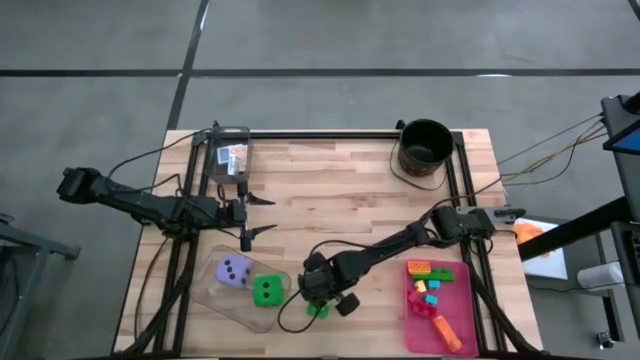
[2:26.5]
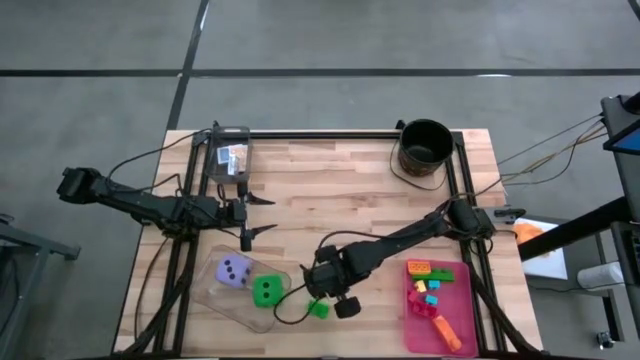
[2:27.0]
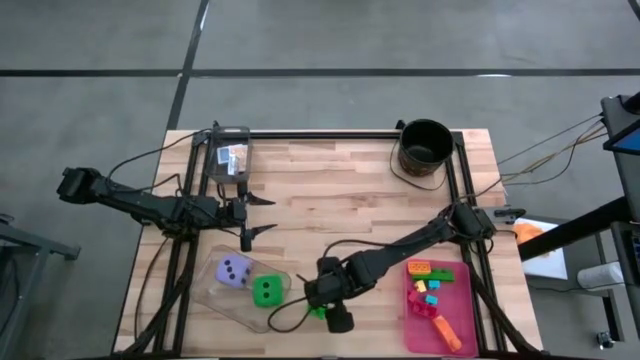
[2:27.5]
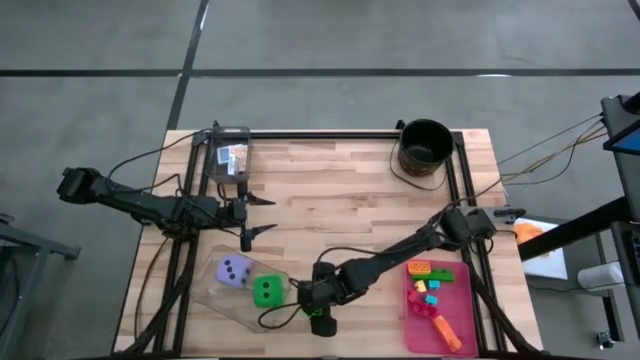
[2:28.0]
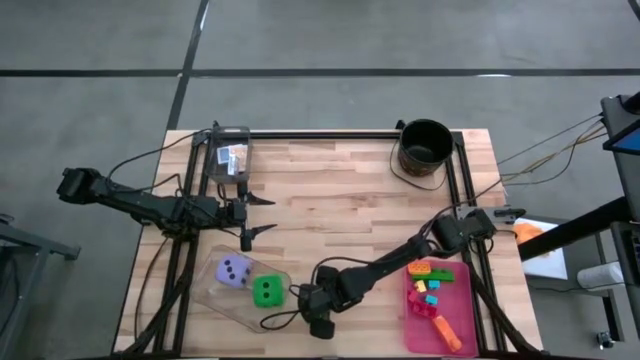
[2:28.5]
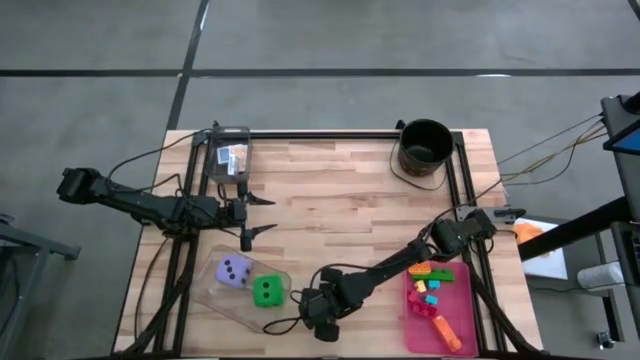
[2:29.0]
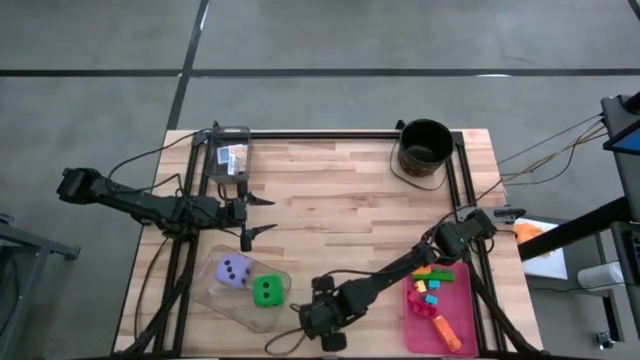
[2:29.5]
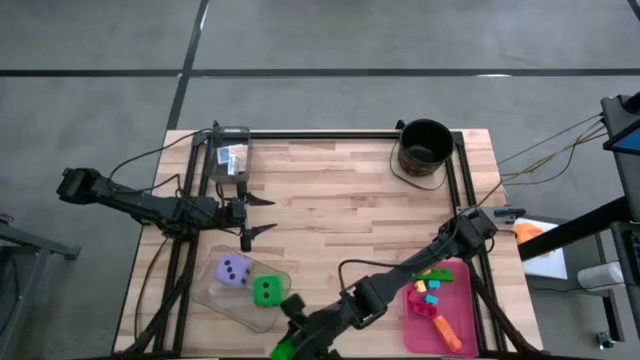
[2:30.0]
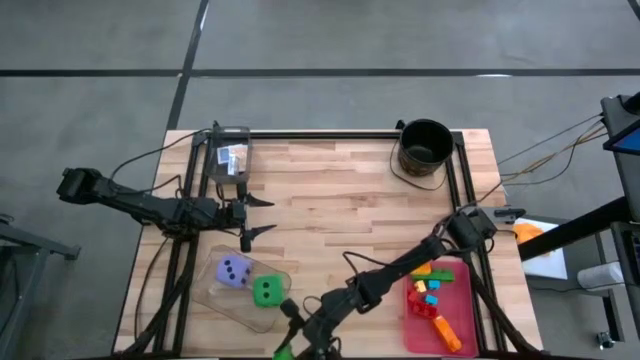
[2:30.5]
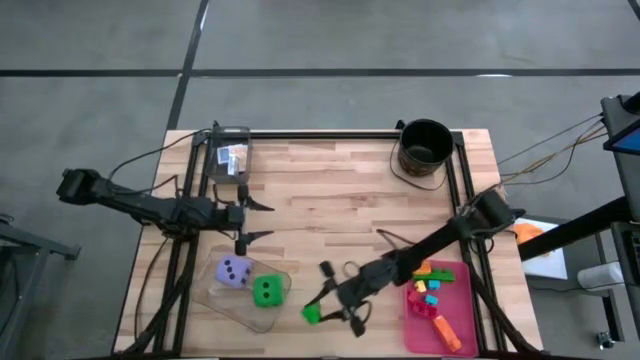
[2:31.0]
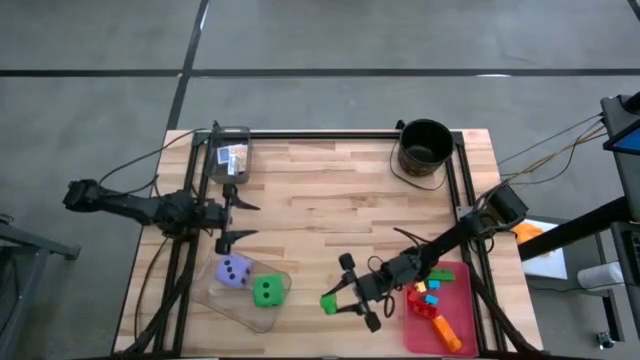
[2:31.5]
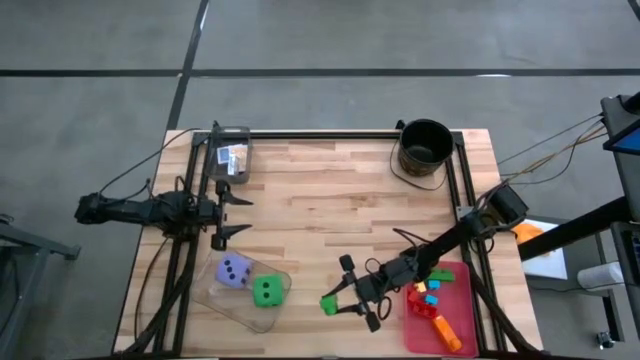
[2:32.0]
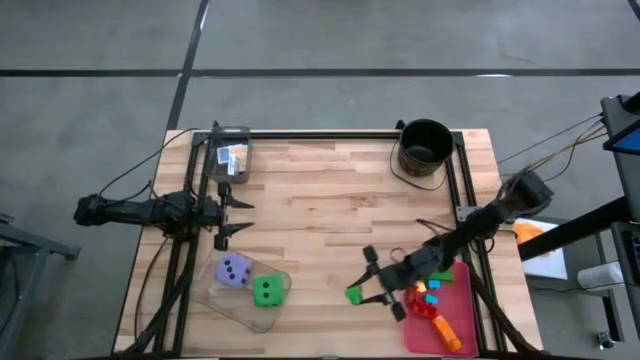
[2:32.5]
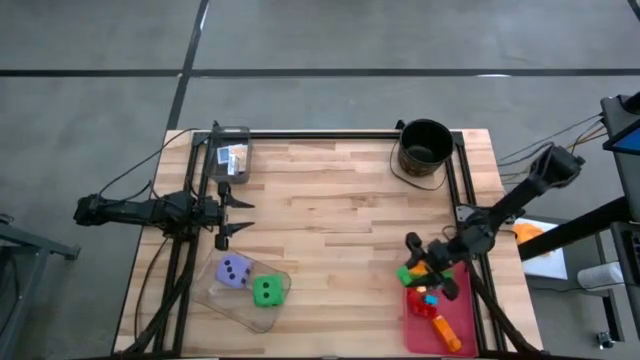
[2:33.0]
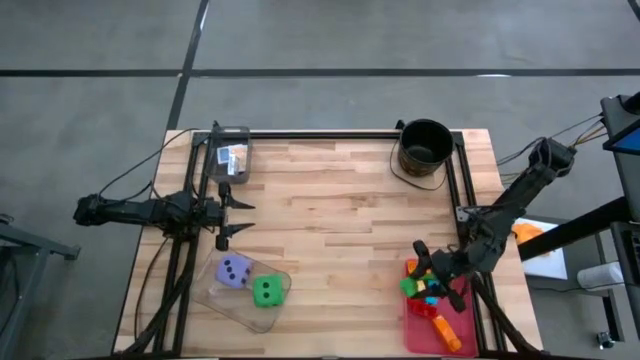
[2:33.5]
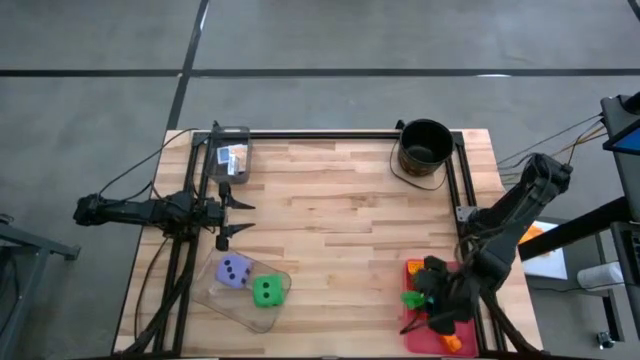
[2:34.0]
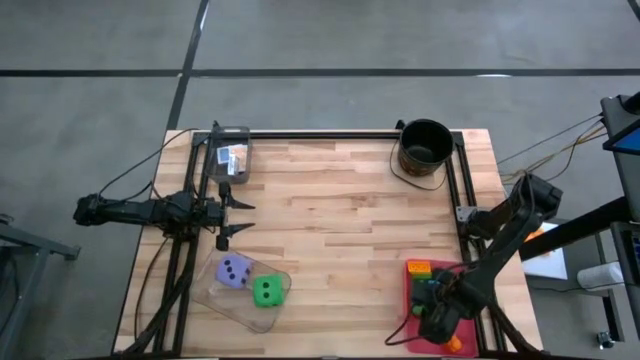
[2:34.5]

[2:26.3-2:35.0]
Task: Pick & Place Toys
Put the green game piece into the pink bin

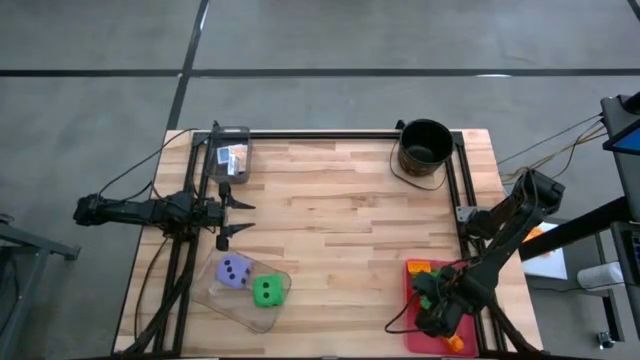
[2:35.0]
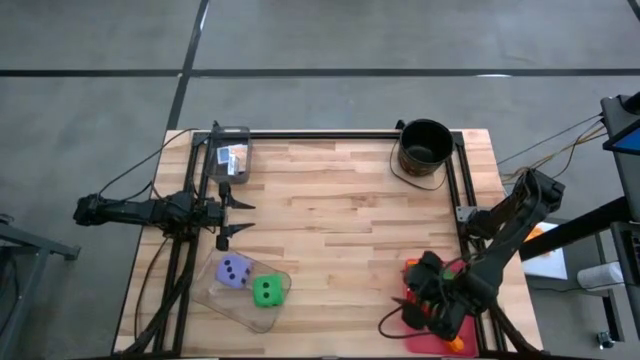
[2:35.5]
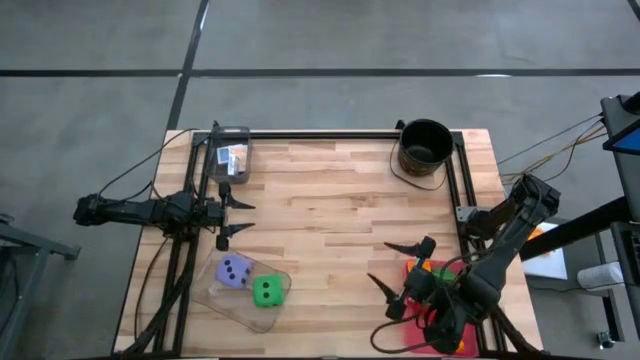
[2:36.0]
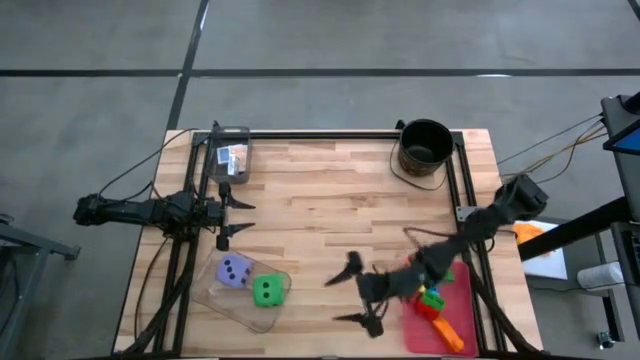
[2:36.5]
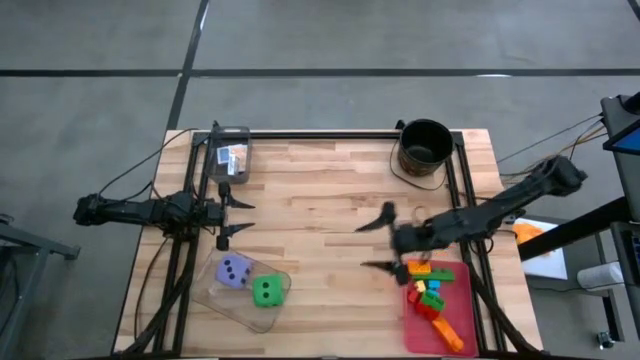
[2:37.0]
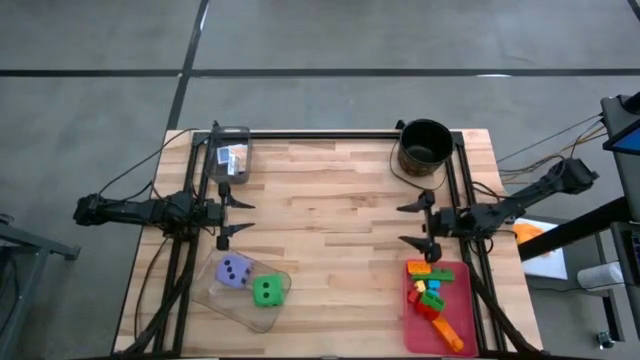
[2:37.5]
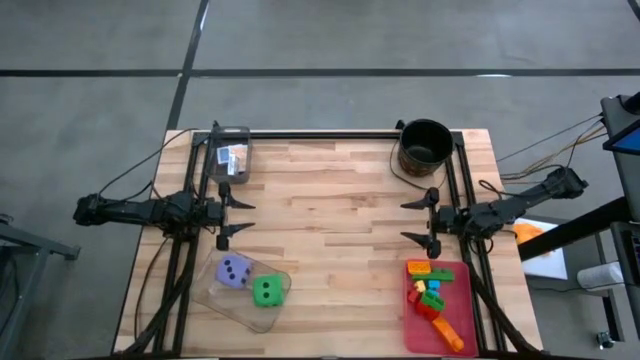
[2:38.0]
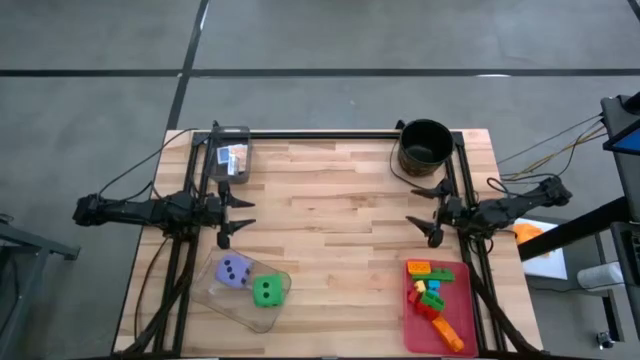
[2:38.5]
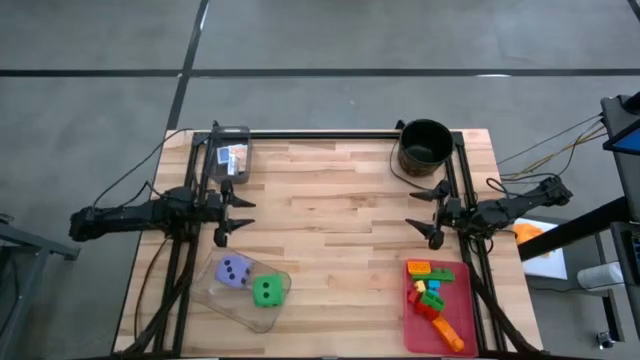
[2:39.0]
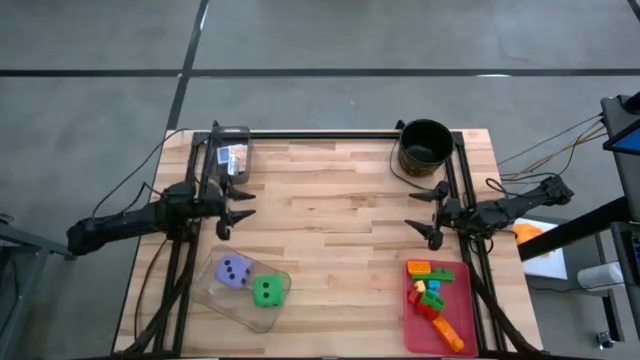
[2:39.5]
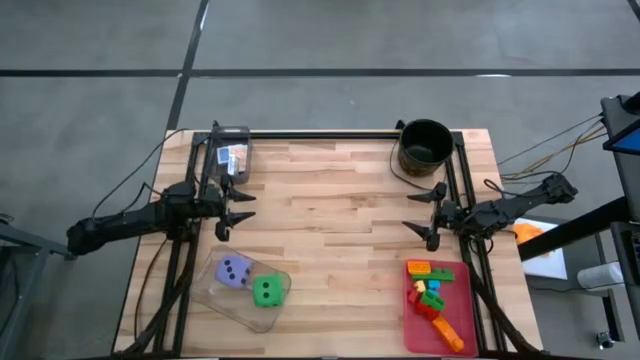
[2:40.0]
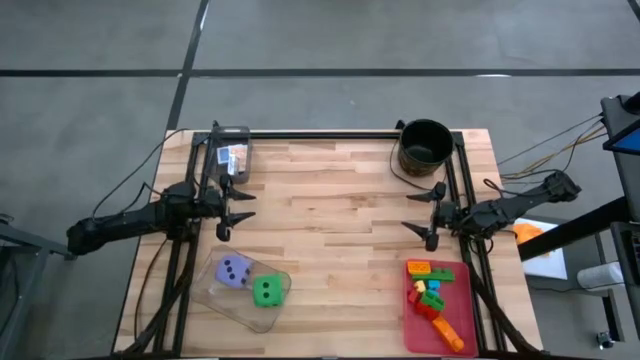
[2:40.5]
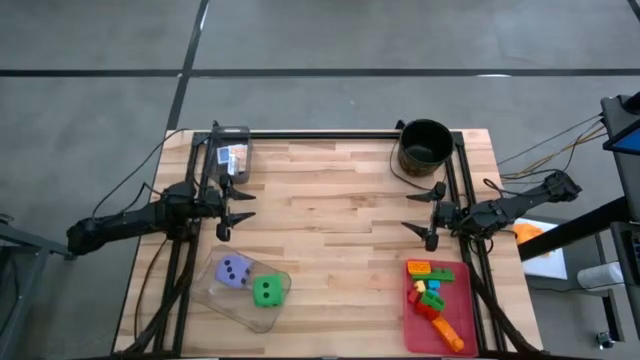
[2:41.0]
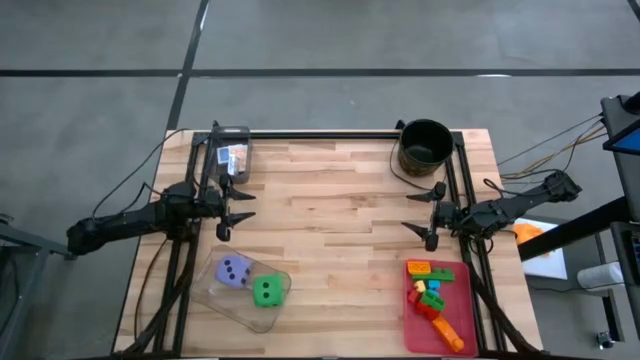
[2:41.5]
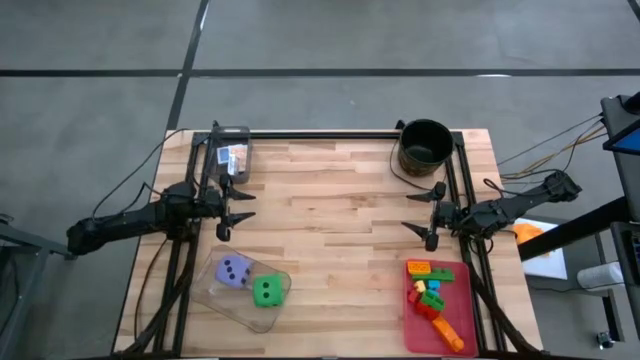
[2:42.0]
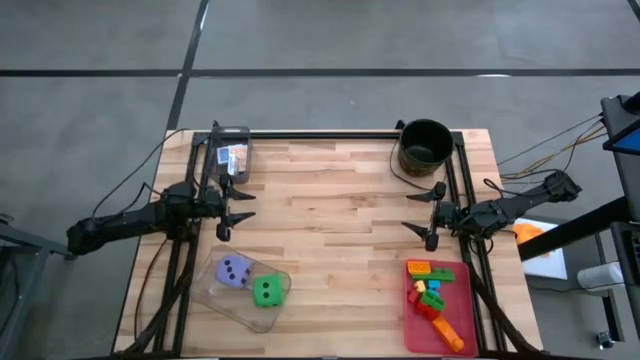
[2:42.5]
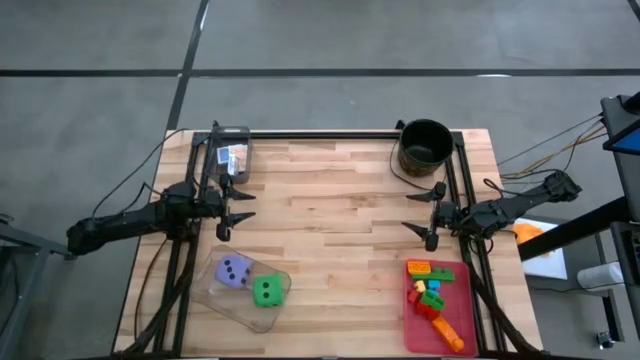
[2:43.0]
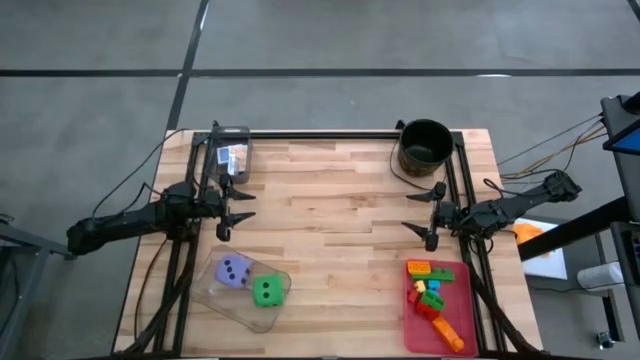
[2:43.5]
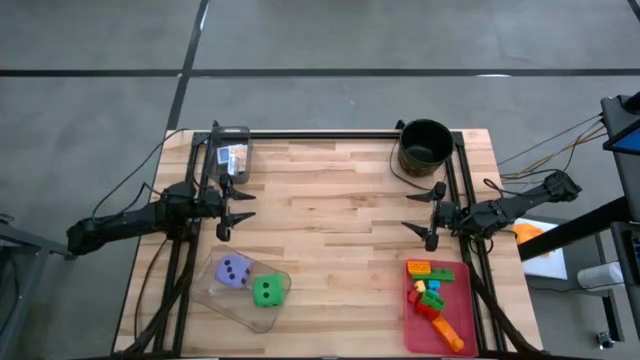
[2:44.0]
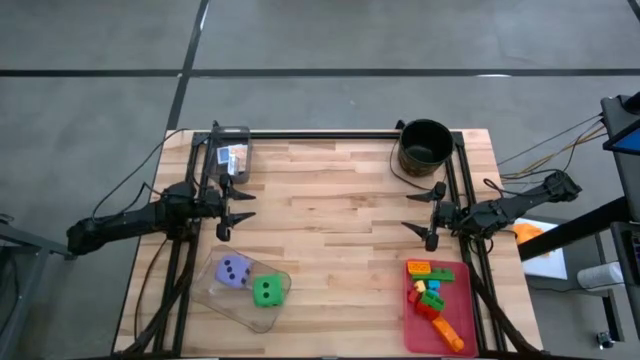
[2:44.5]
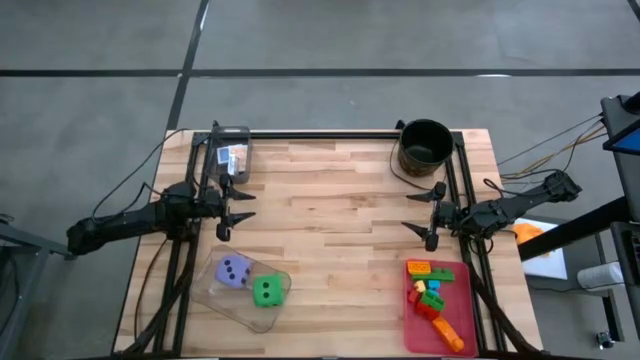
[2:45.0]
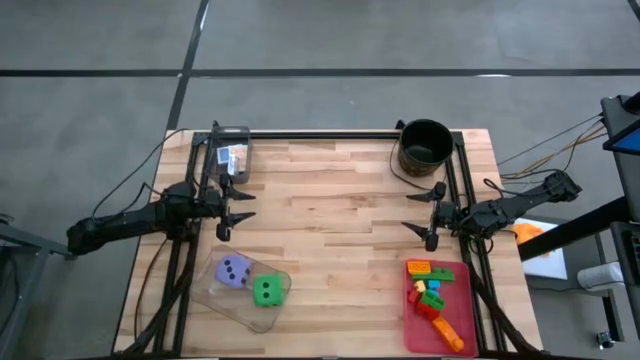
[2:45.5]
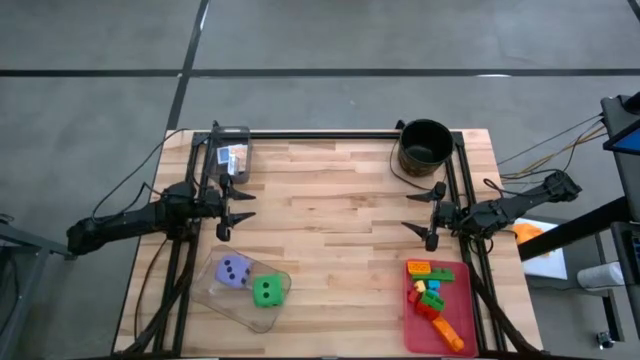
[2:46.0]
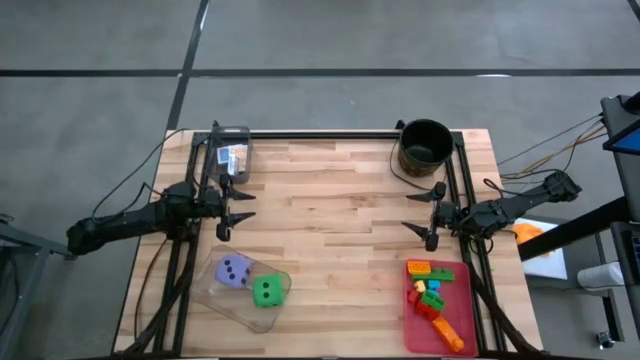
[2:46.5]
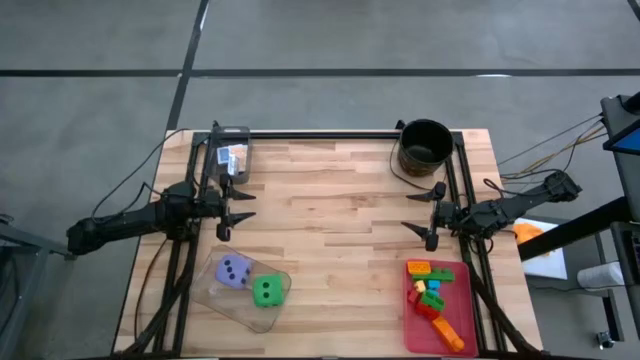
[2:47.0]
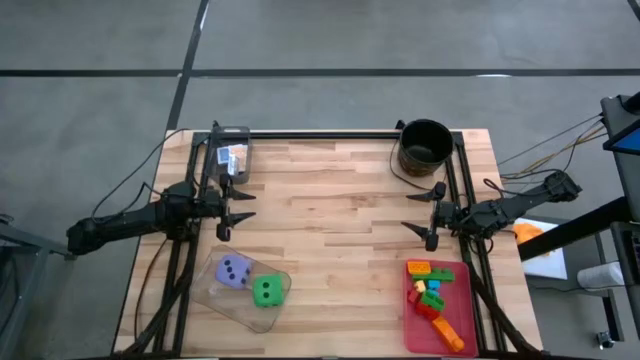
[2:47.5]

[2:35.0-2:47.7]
Return to Home Position

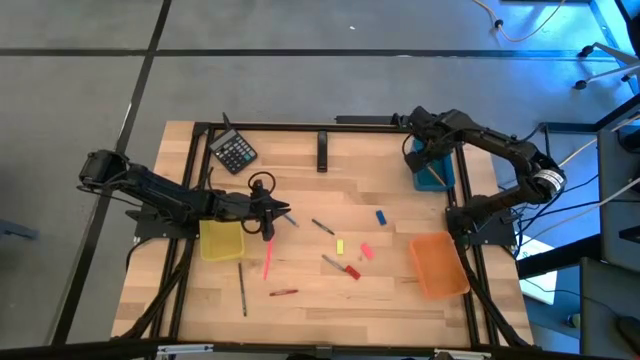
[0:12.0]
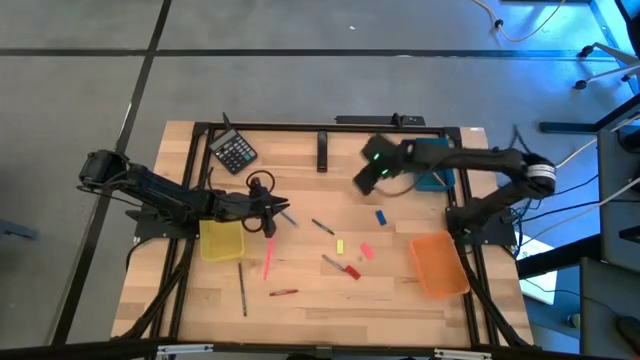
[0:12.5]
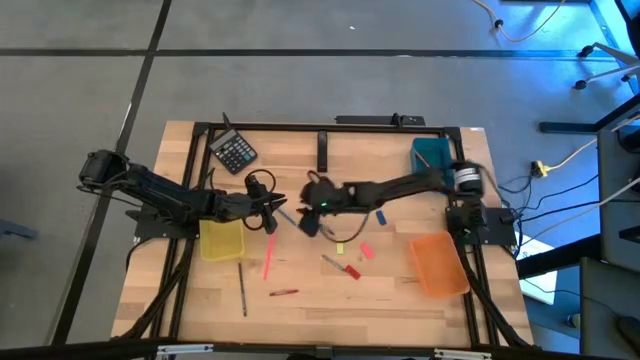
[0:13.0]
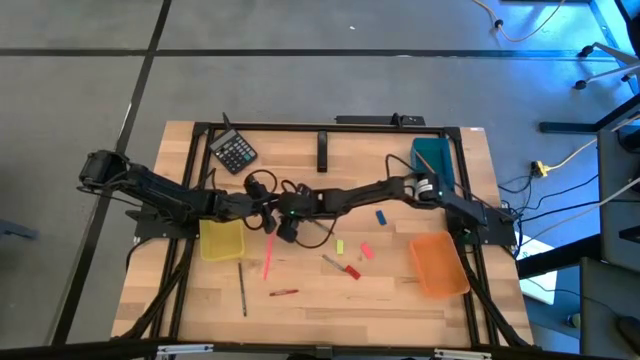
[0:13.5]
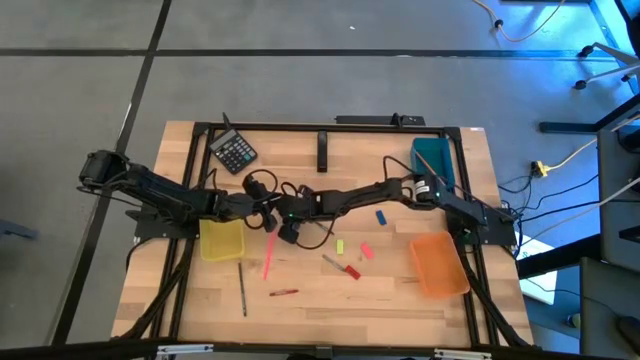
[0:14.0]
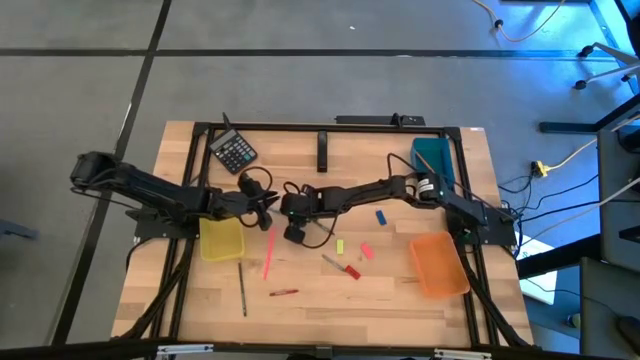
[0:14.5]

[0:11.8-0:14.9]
Task: Sort crayons/erasers/pens/pencils in bins
Put the blue pencil into the blue bin
